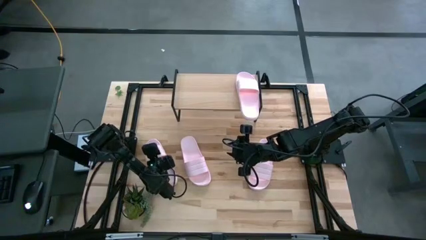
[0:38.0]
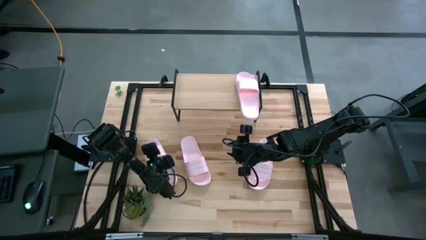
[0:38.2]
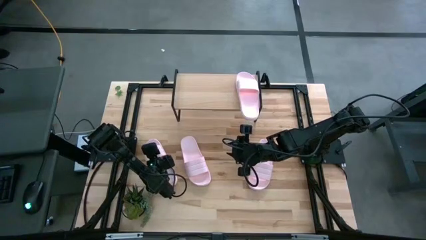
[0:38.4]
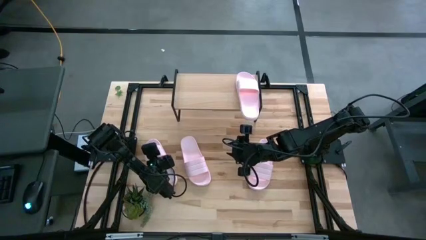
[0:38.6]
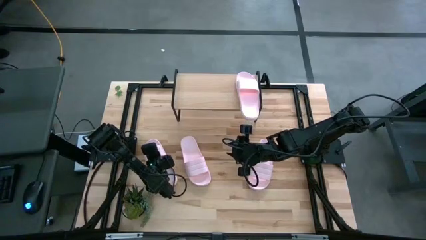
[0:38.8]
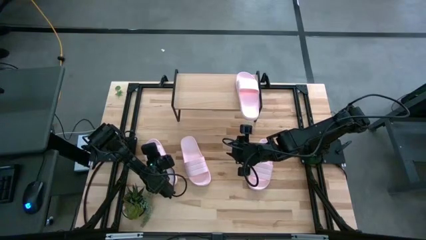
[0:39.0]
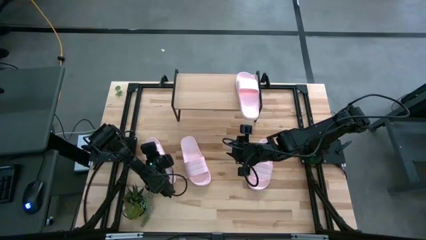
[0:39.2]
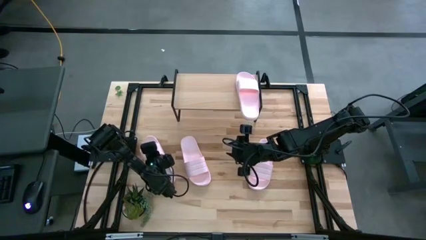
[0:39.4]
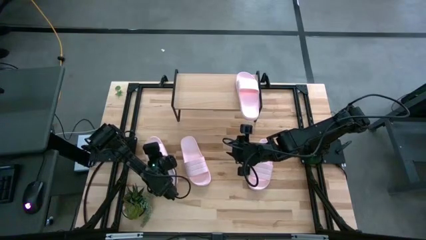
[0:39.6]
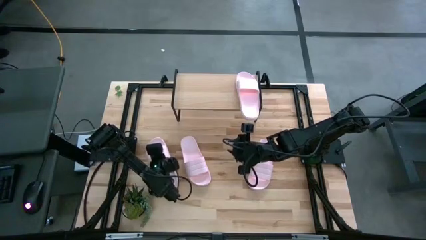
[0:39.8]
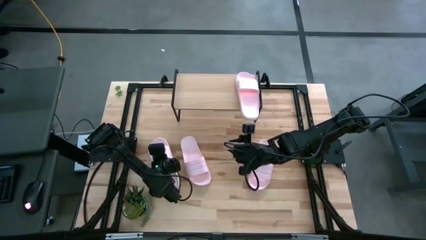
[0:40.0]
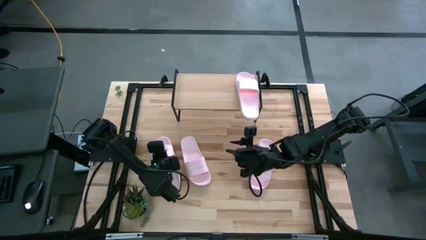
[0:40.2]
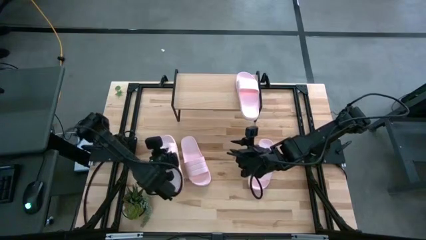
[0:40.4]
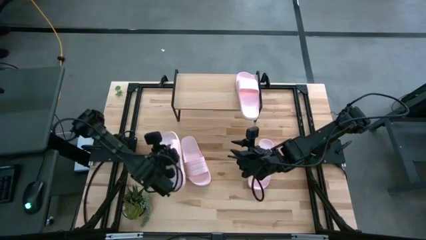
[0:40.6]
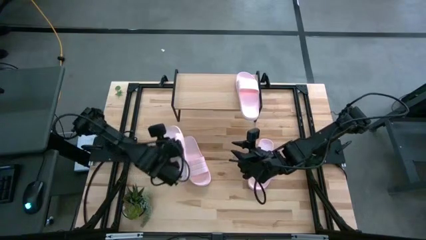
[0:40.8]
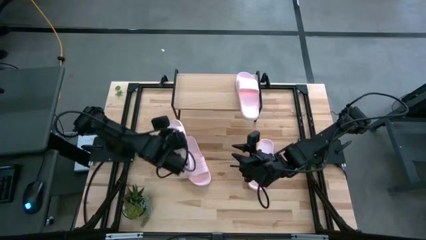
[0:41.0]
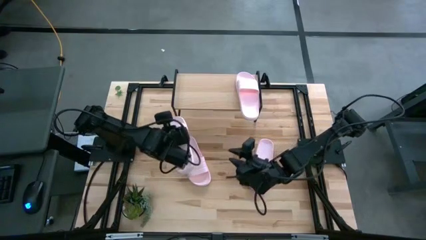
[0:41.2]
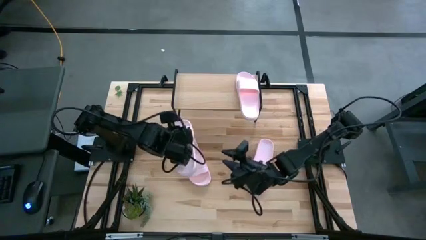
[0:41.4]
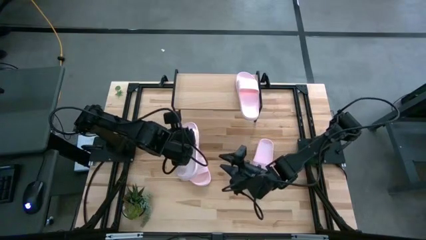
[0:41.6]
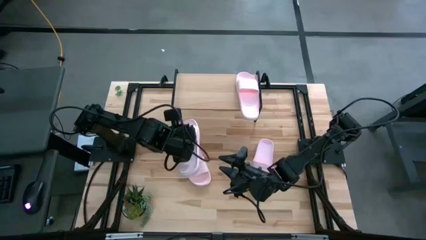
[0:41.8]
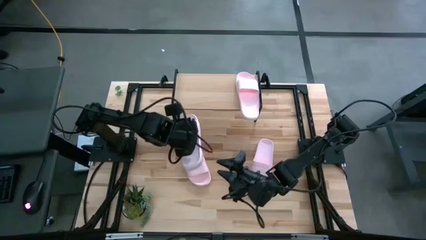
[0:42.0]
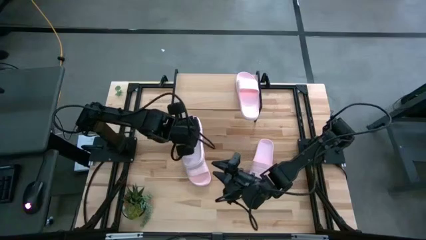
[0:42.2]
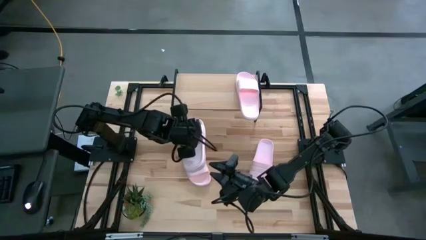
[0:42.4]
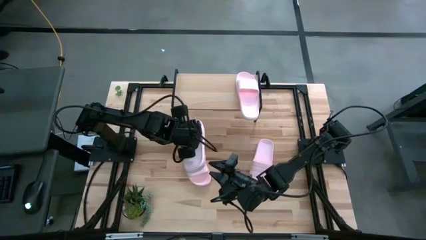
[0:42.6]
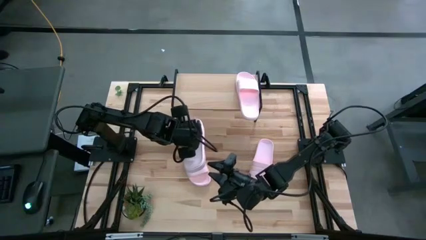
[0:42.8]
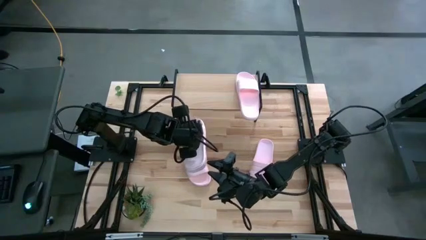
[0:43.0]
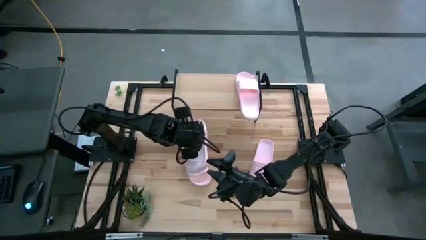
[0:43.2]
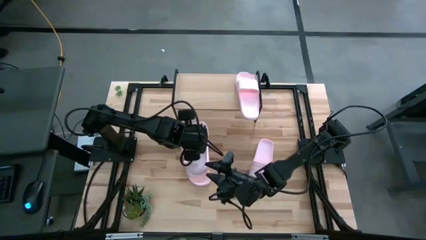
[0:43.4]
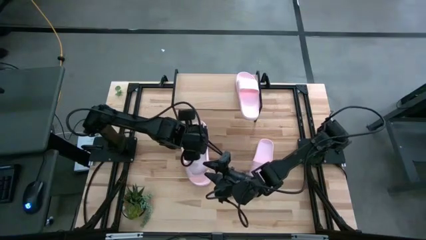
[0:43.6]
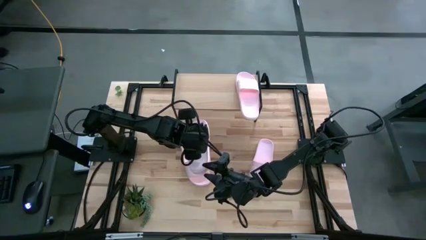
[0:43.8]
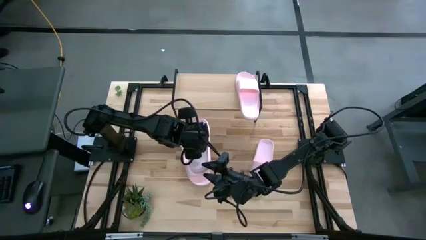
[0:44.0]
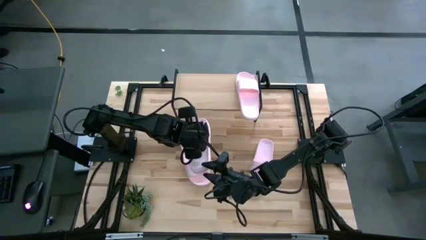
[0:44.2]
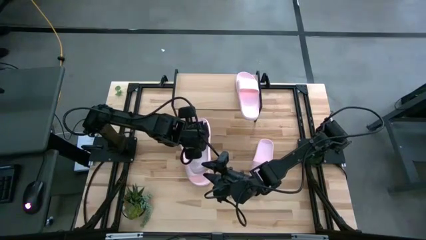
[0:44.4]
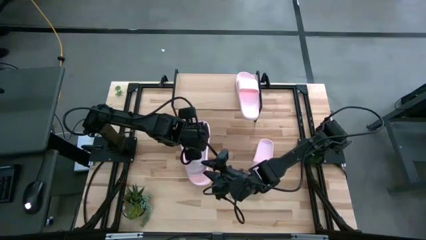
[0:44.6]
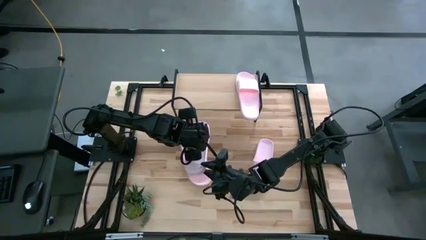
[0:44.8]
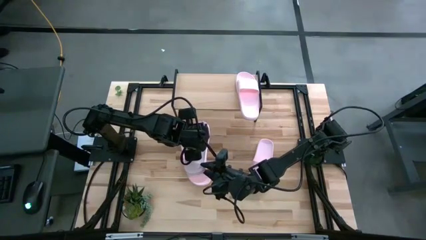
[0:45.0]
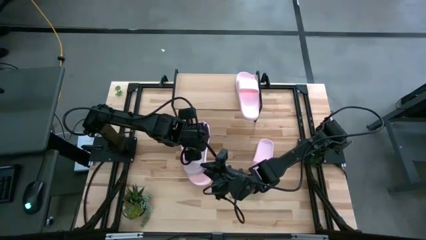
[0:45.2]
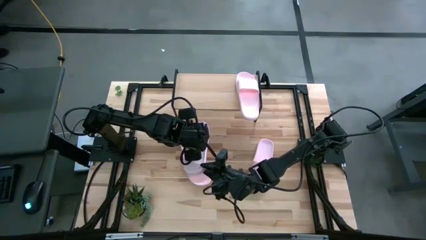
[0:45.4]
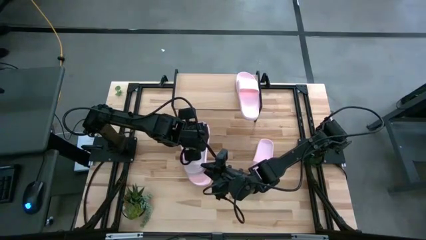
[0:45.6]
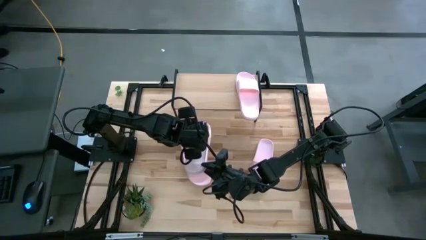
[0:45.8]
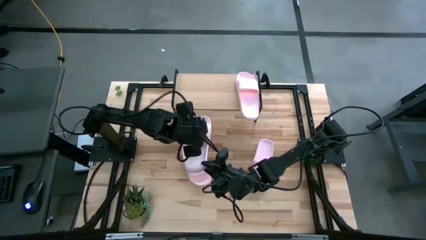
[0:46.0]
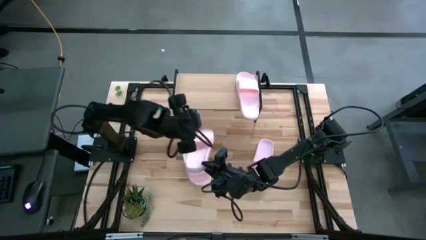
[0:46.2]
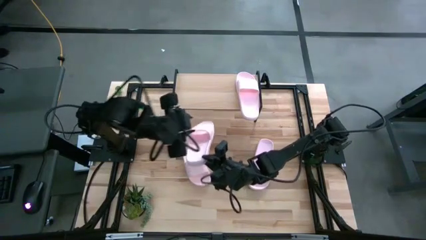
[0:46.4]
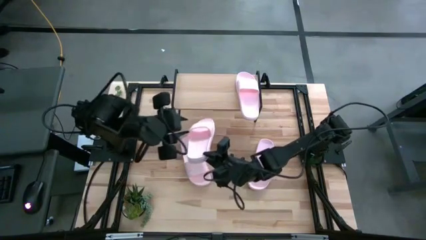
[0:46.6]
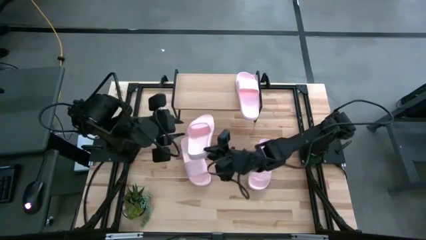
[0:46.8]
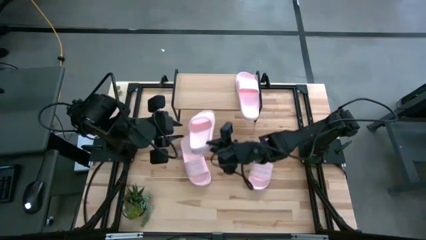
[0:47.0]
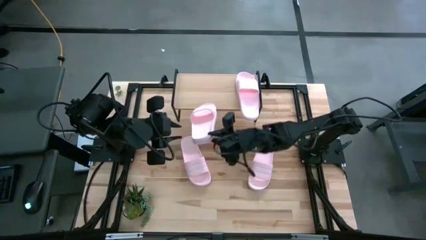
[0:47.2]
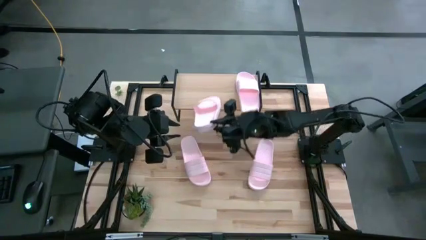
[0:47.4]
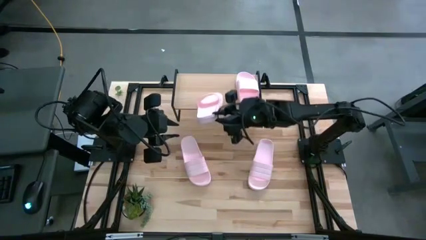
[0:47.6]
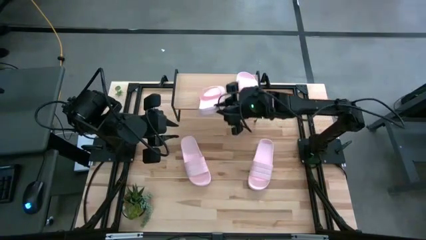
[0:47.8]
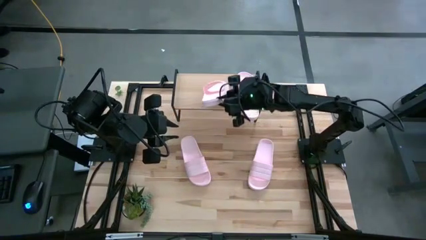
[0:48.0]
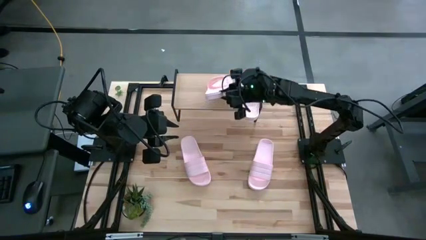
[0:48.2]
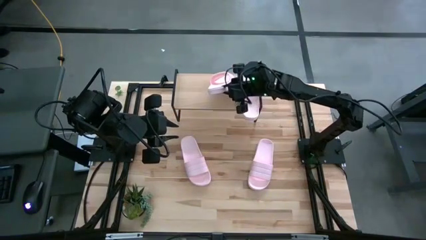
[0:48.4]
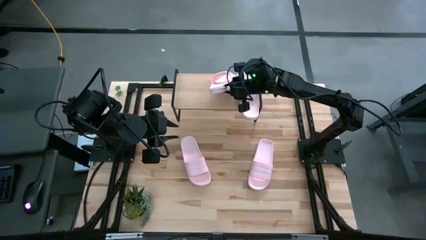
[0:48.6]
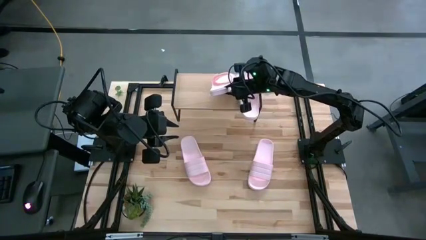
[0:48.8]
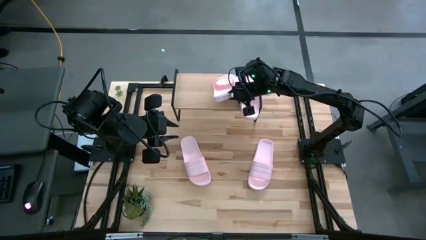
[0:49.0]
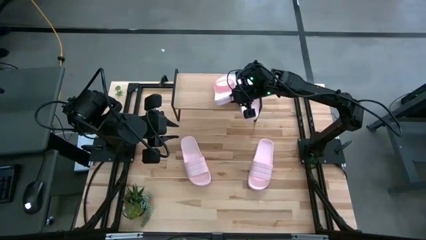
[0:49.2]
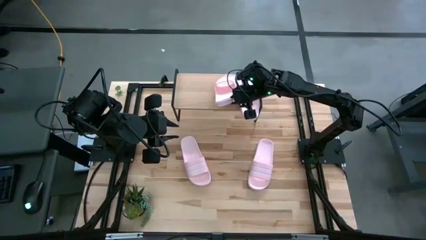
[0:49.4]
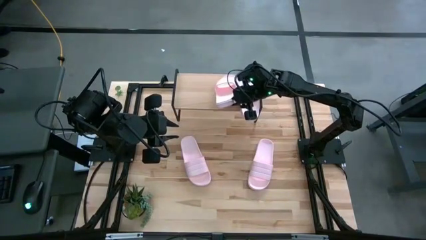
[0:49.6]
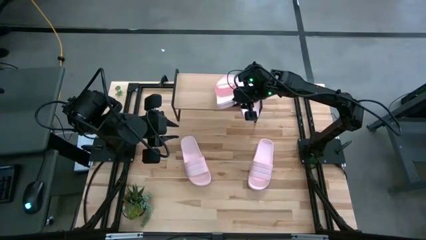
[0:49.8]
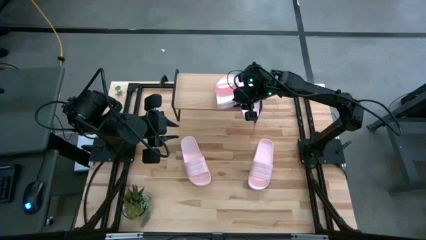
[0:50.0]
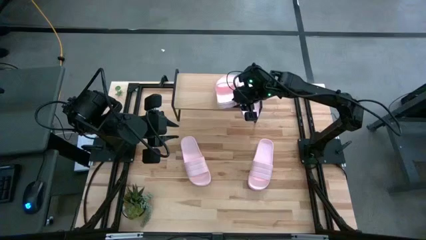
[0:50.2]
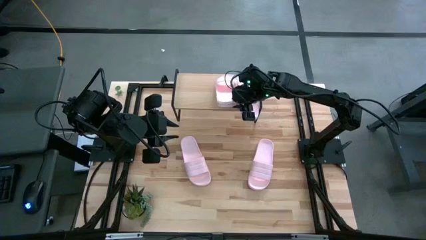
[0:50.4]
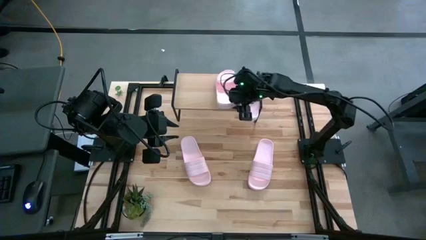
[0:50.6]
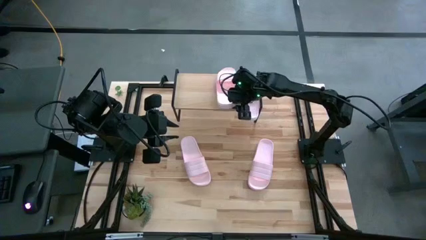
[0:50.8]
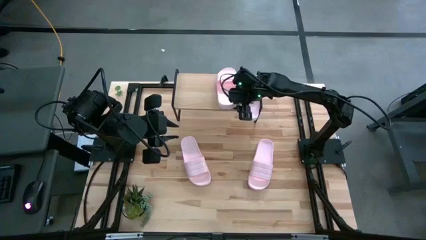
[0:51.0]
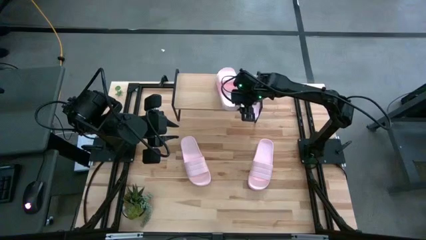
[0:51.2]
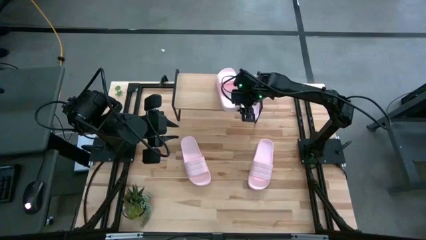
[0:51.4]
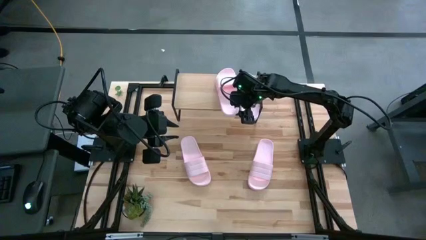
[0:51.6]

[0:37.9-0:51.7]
Task: Pick and place slides into the shelf
Put the white slide on the shelf
